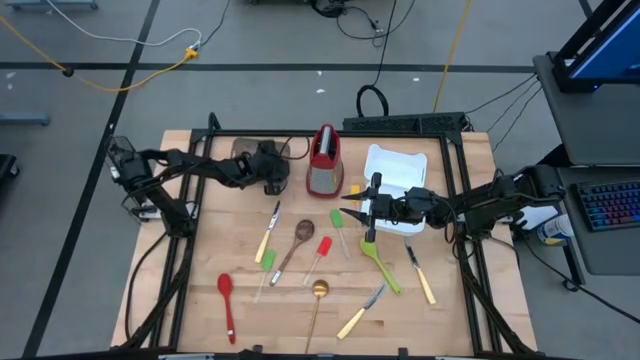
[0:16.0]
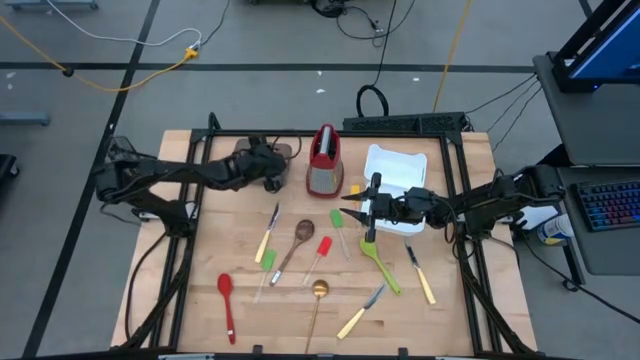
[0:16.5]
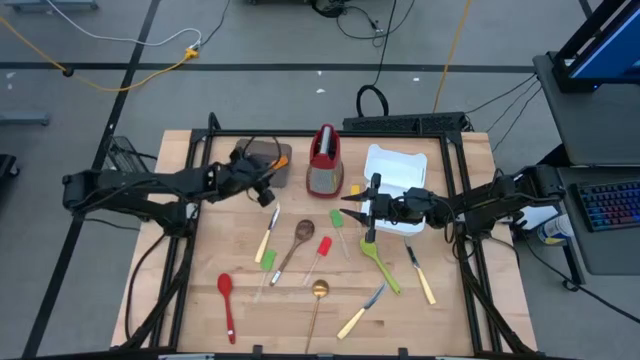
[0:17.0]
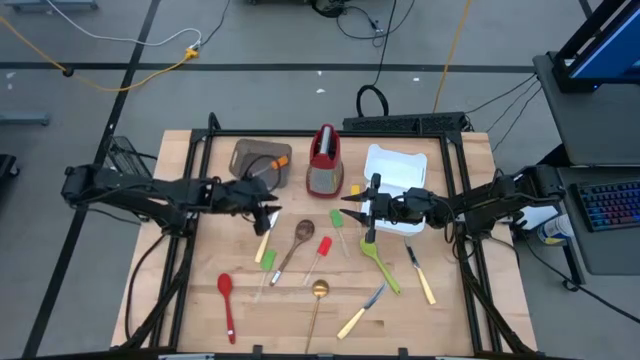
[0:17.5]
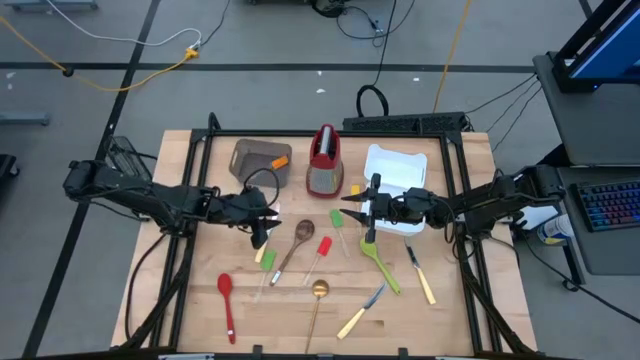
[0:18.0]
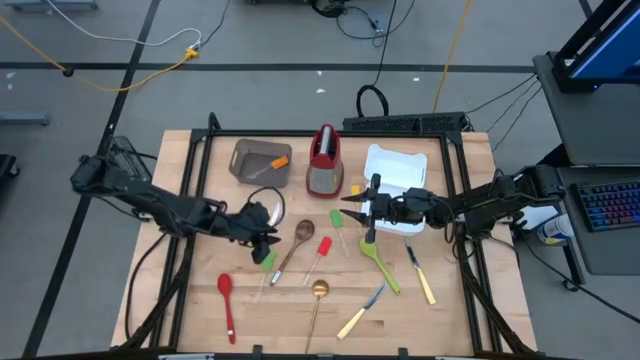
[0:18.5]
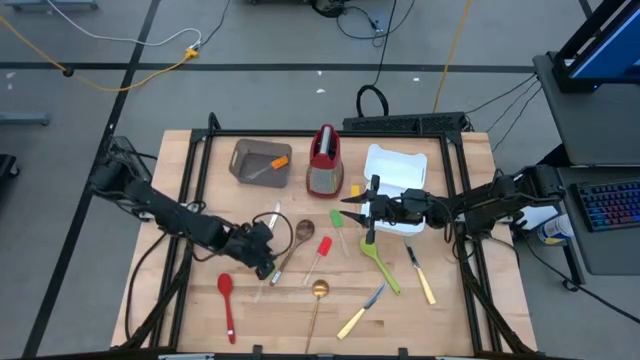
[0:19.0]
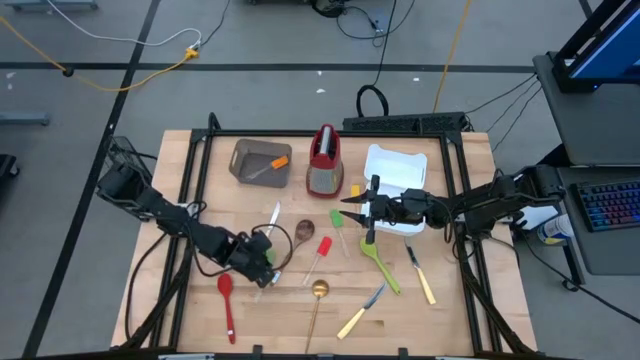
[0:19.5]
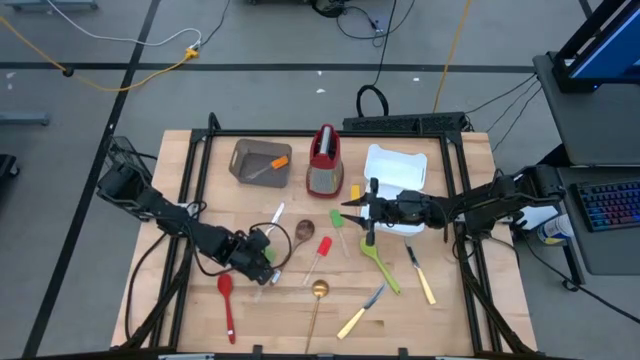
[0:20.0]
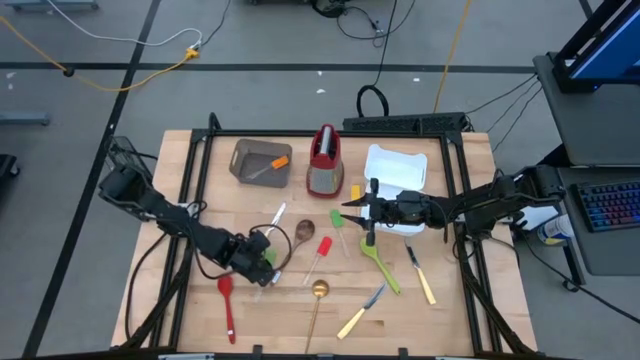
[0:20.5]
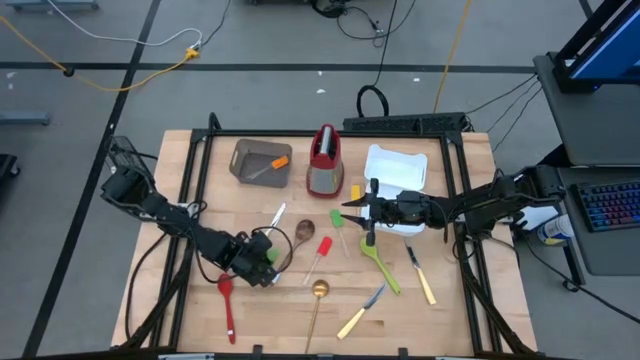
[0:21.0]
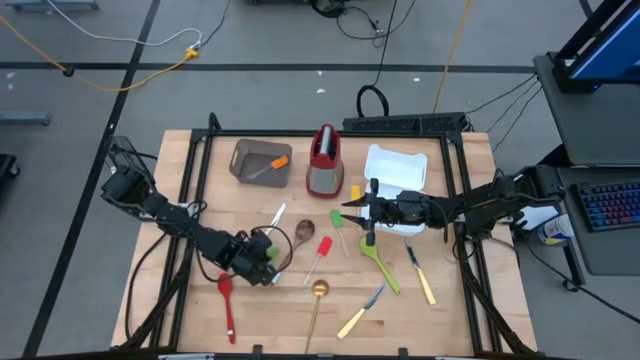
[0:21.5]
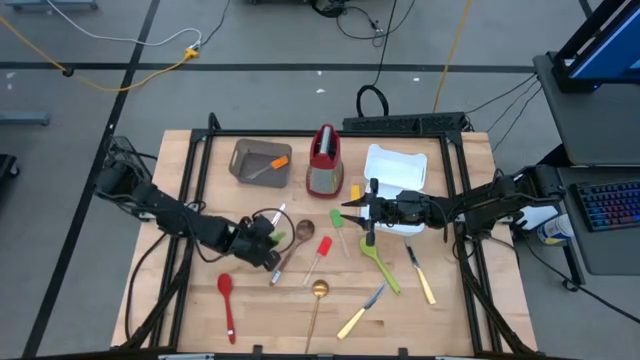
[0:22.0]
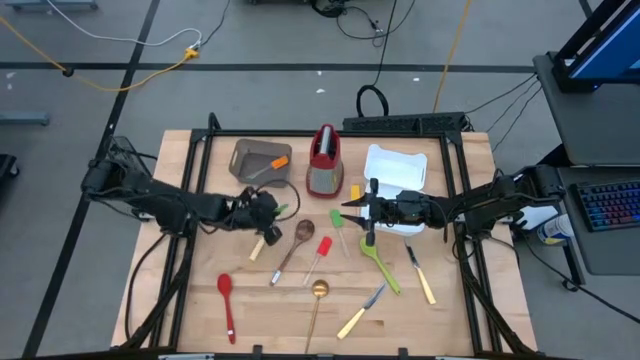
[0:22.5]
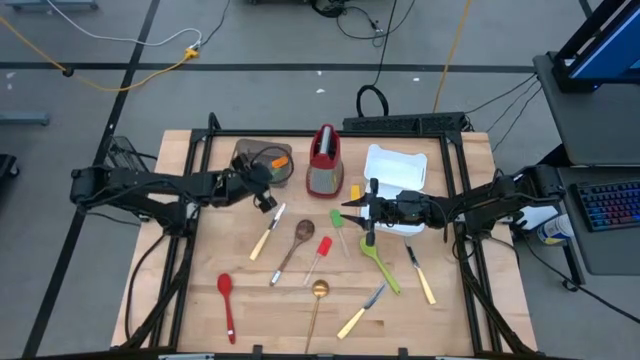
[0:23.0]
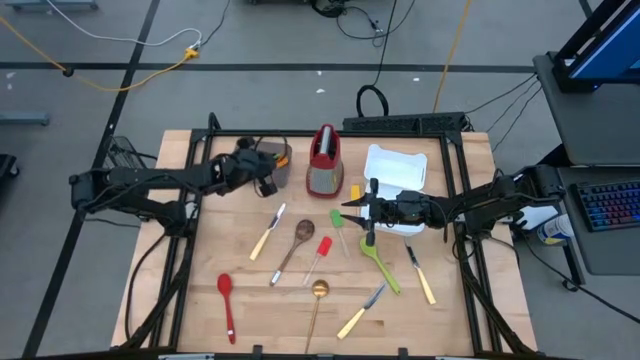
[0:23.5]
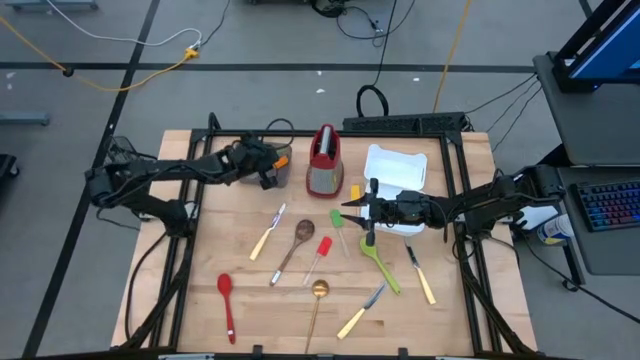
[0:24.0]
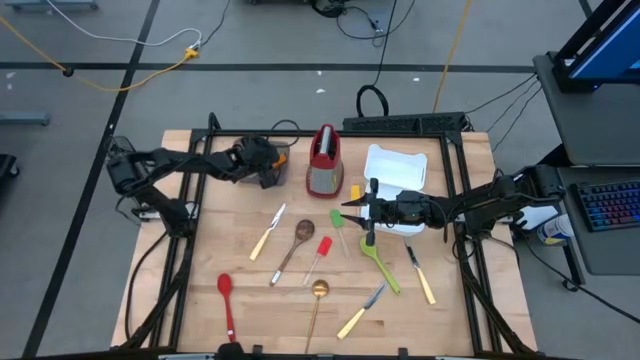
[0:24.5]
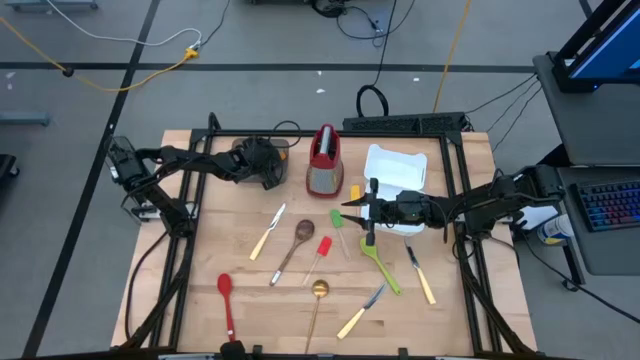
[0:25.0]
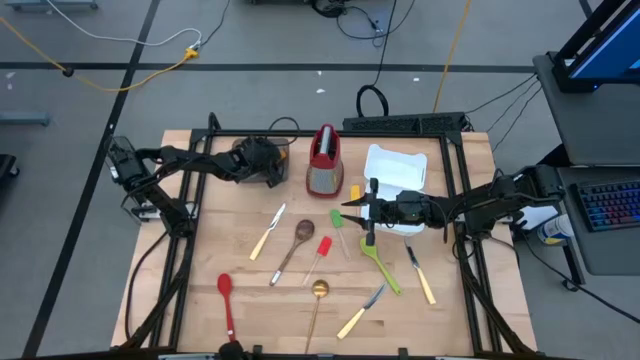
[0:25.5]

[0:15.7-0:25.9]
Task: Pick & Place Kitchen Items
Put the left green spatula into the black bin

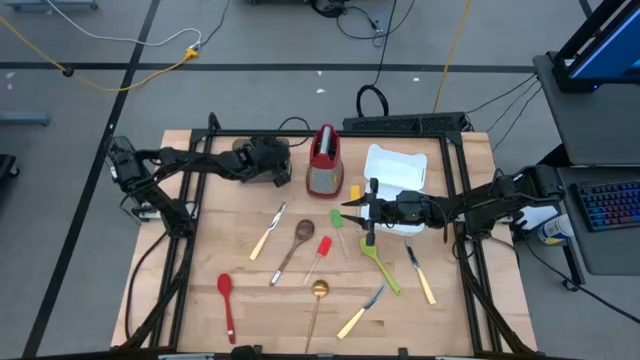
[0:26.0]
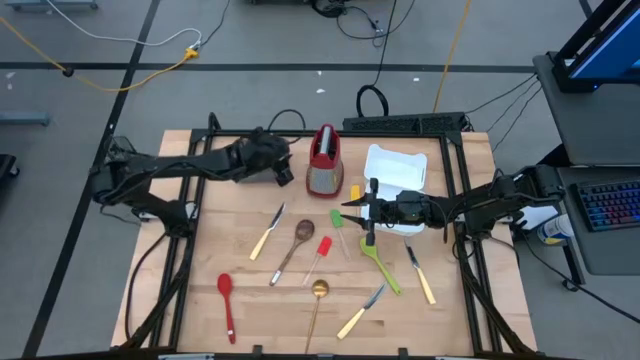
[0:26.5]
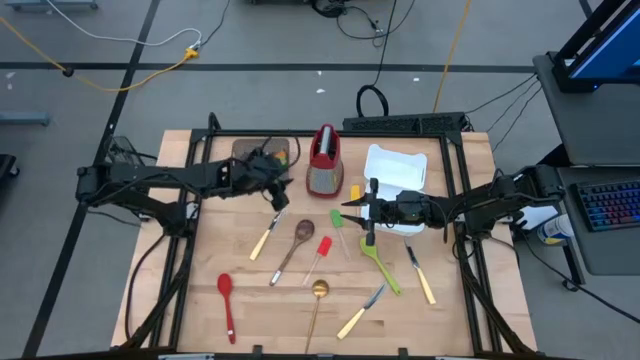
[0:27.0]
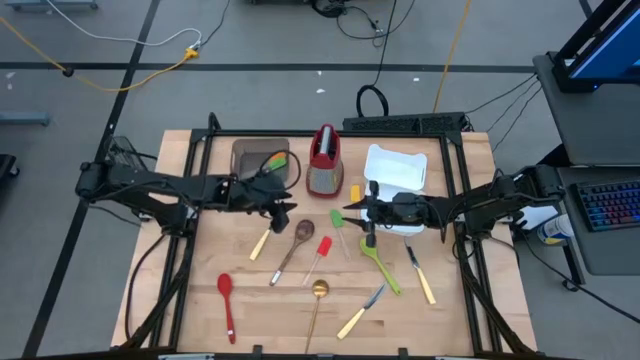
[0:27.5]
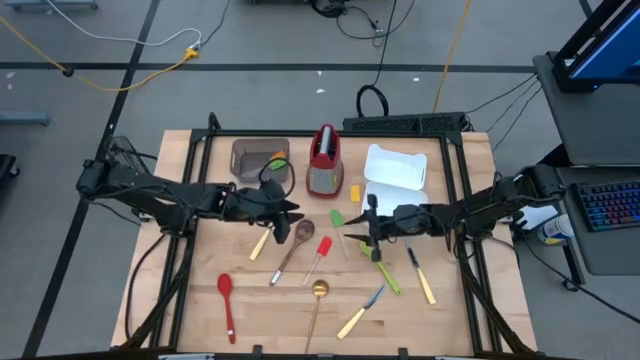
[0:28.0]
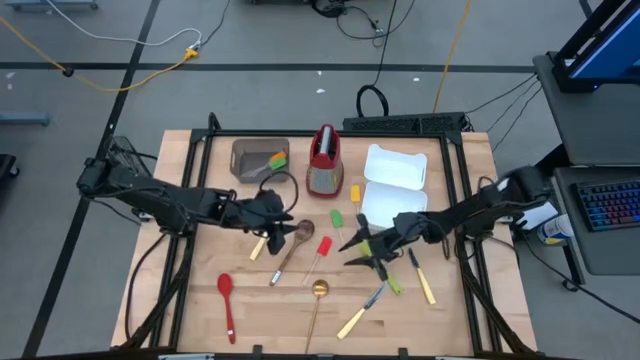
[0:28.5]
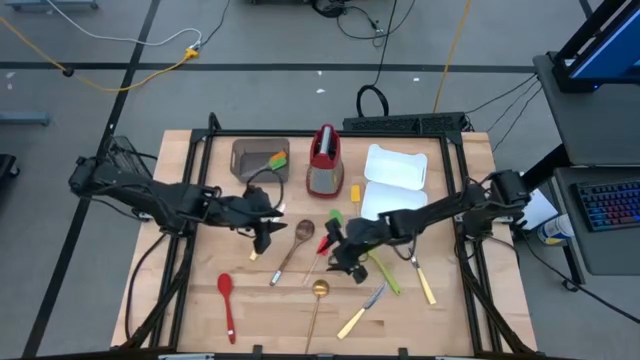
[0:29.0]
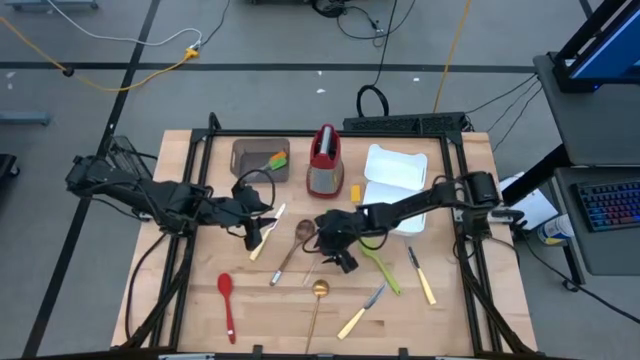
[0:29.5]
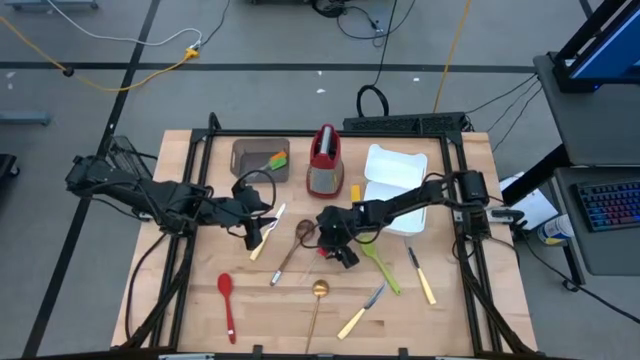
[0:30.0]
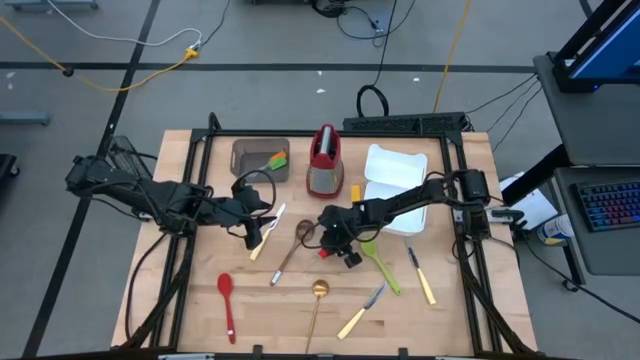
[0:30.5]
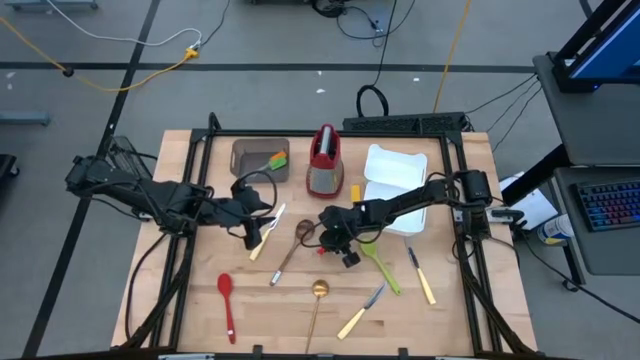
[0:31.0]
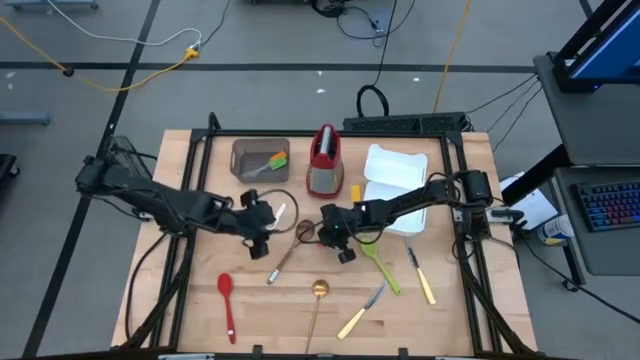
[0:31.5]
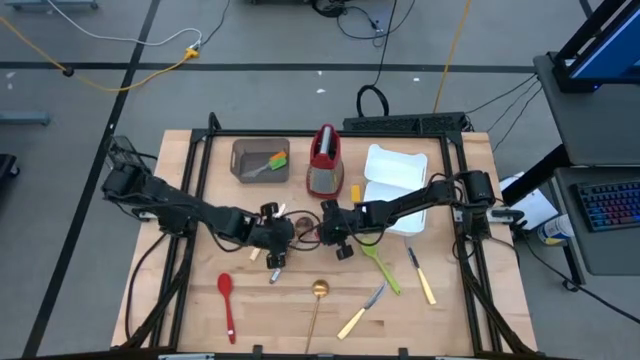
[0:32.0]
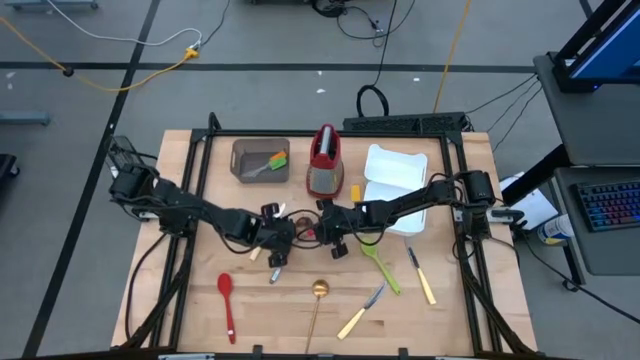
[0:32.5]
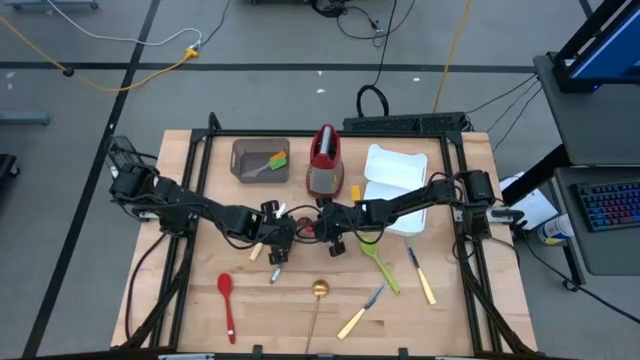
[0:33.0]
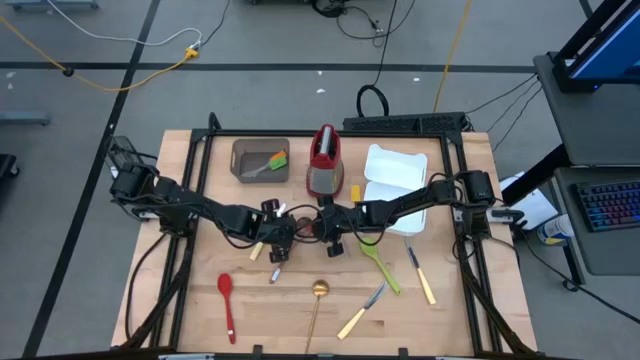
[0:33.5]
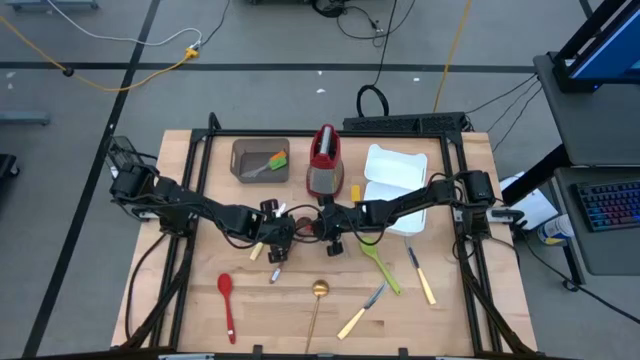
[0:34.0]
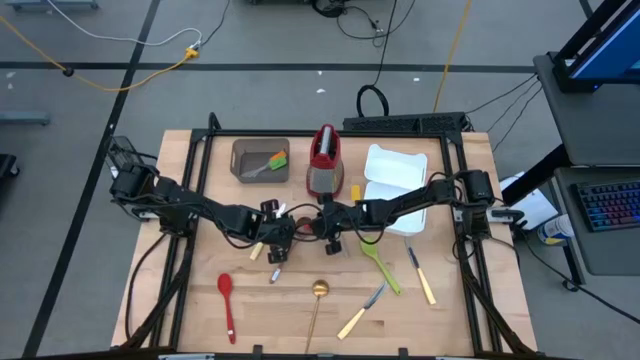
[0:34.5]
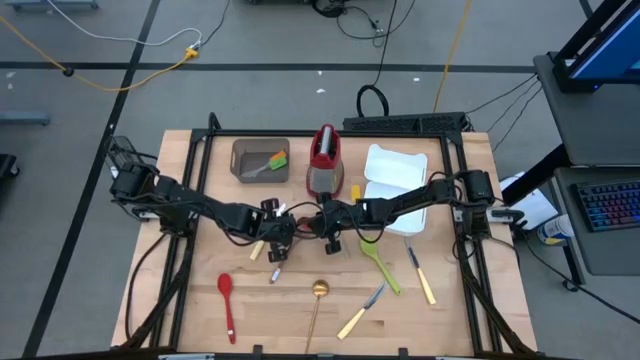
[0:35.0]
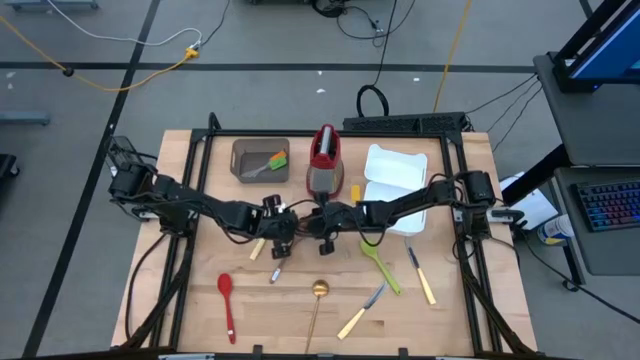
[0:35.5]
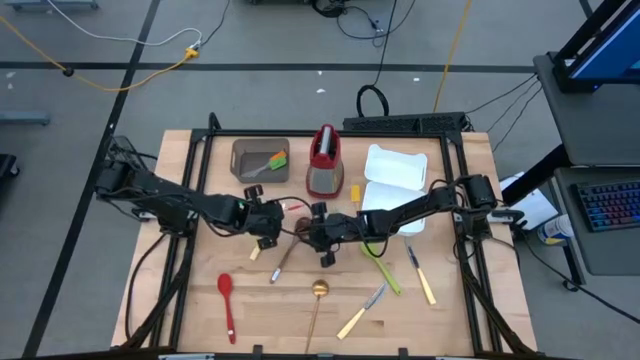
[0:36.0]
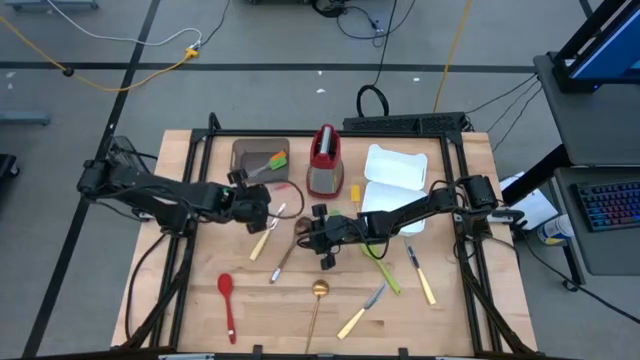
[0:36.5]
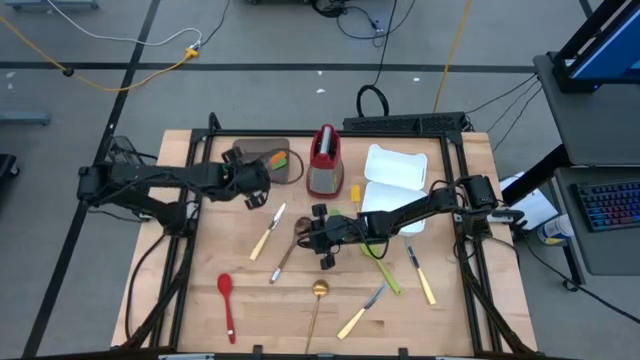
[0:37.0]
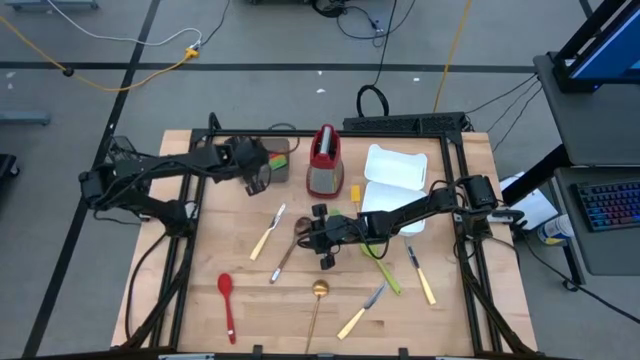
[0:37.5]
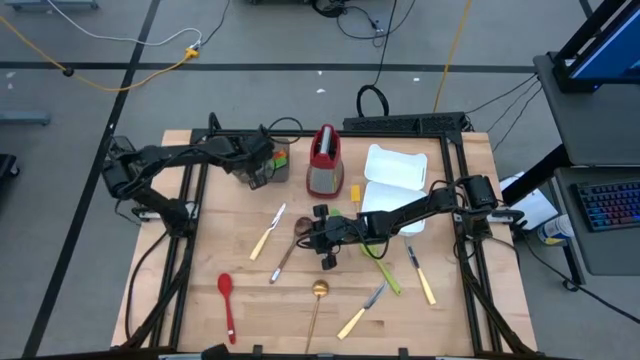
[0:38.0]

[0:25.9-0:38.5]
Put the red spatula into the black bin
